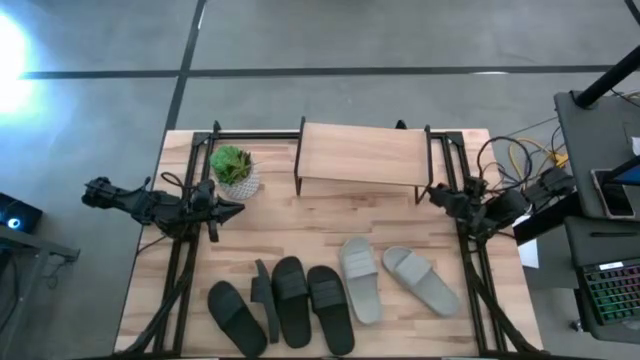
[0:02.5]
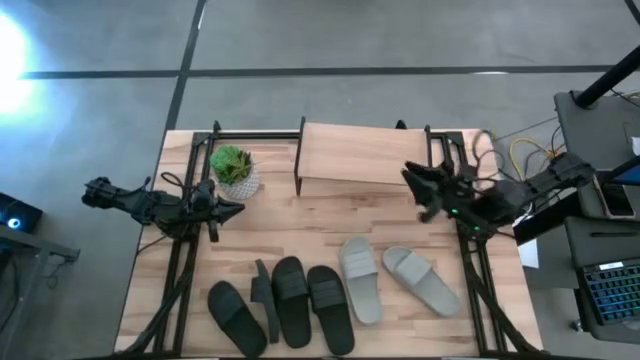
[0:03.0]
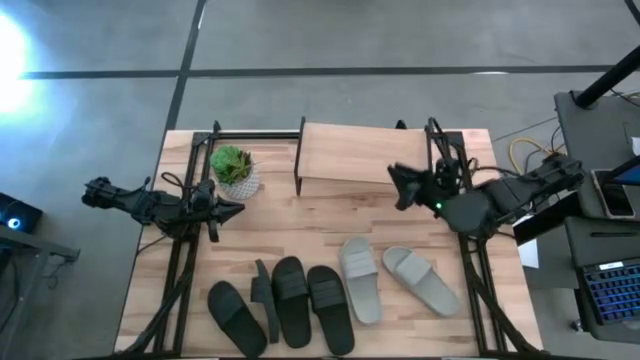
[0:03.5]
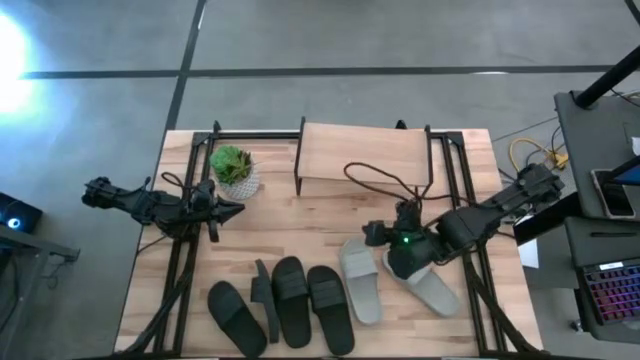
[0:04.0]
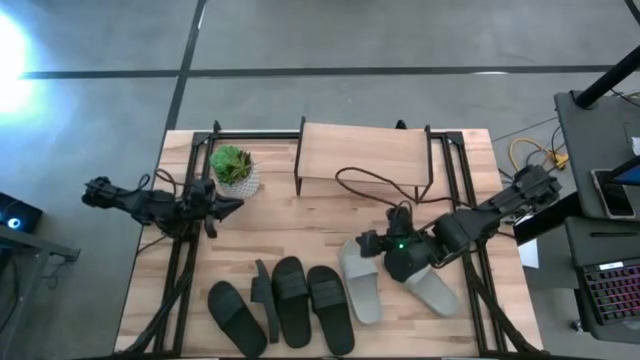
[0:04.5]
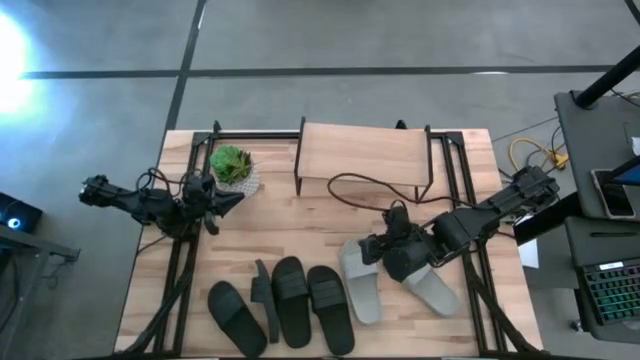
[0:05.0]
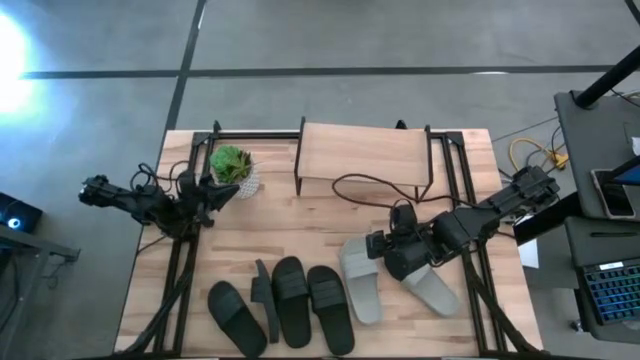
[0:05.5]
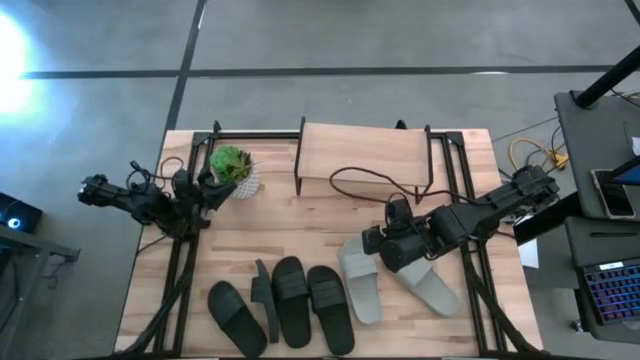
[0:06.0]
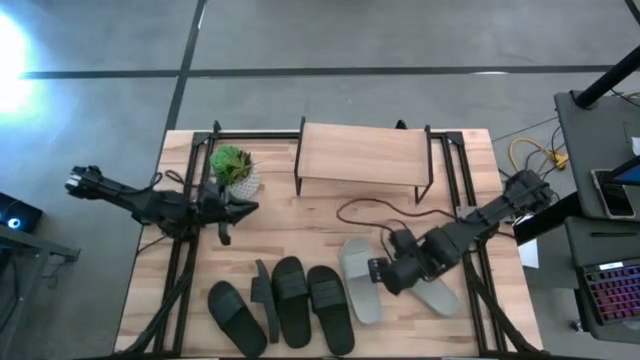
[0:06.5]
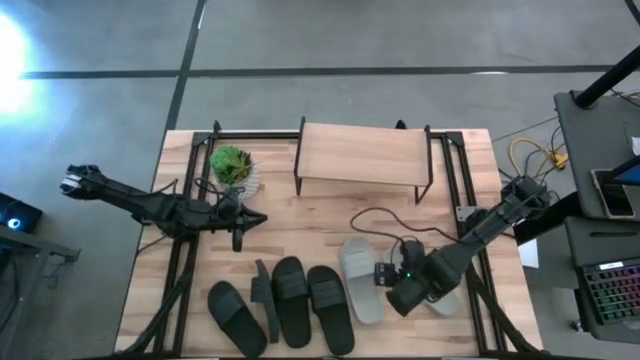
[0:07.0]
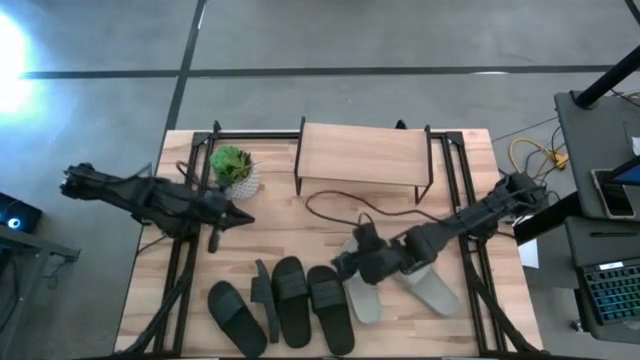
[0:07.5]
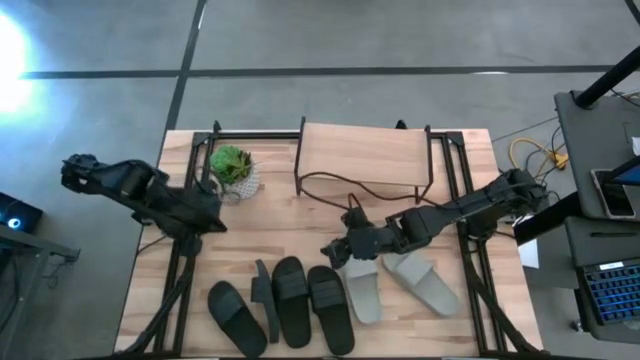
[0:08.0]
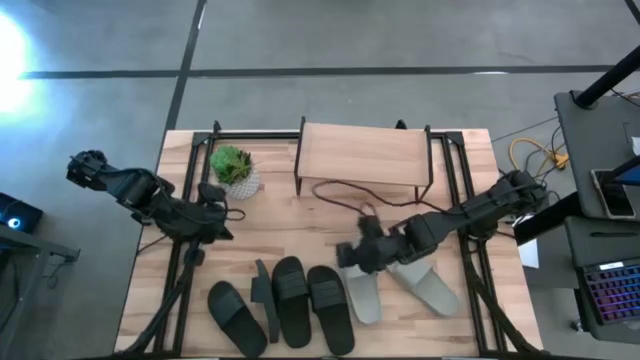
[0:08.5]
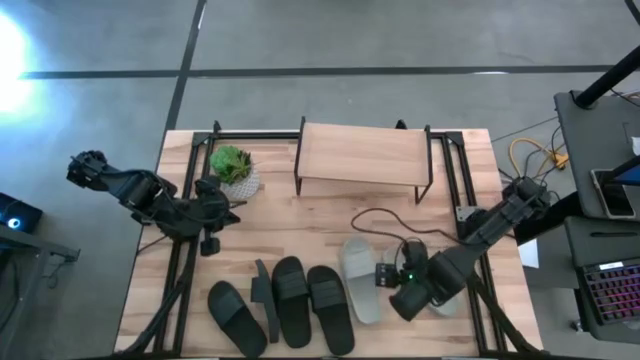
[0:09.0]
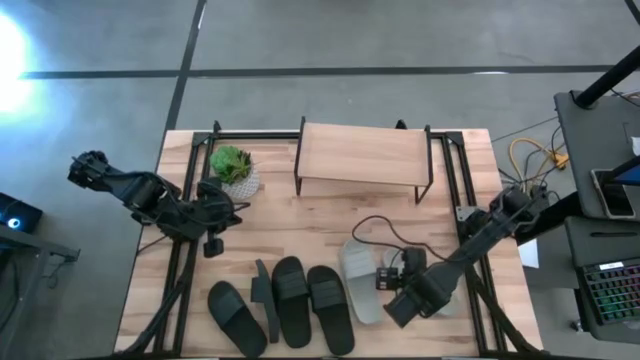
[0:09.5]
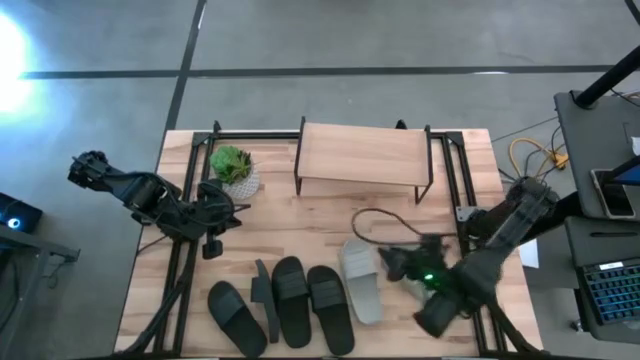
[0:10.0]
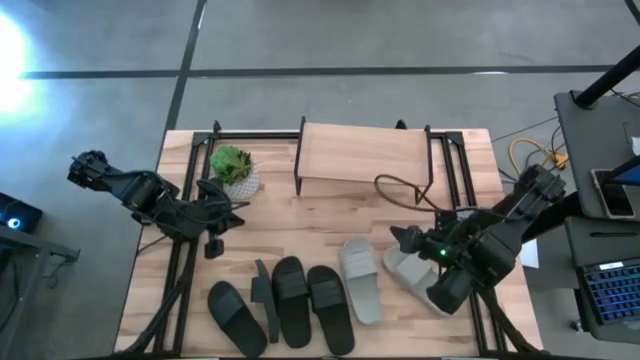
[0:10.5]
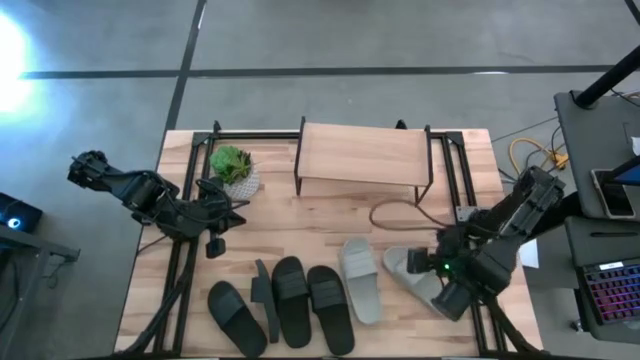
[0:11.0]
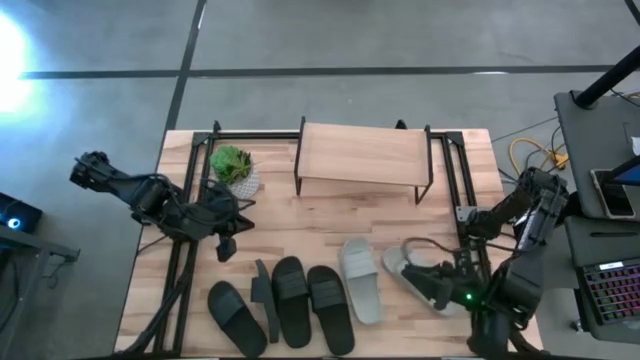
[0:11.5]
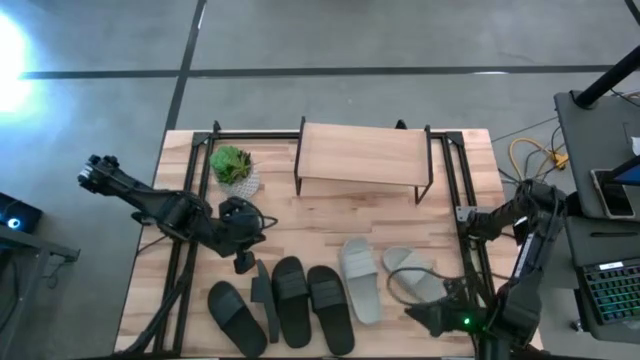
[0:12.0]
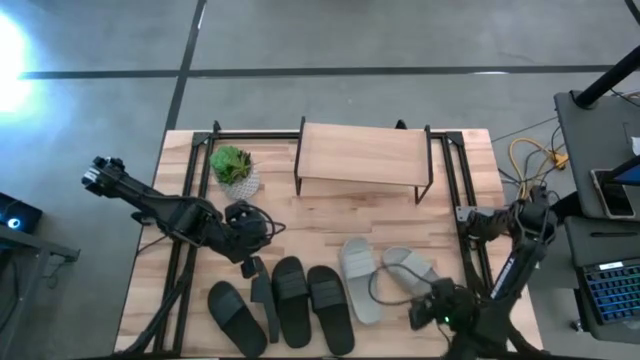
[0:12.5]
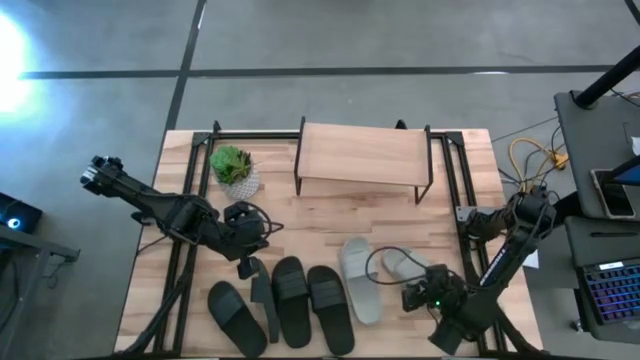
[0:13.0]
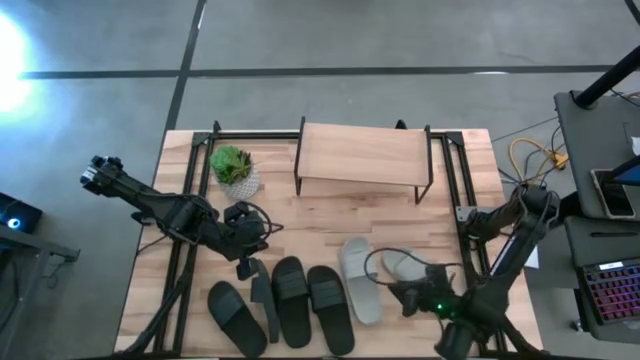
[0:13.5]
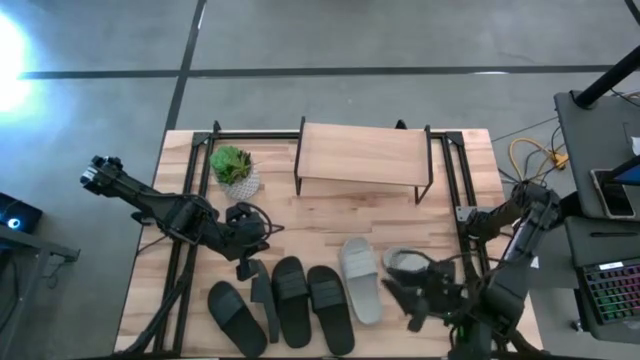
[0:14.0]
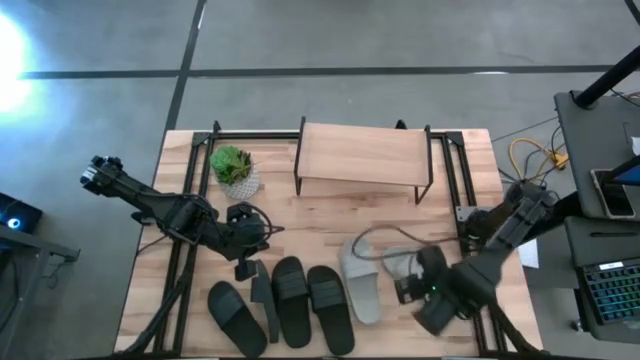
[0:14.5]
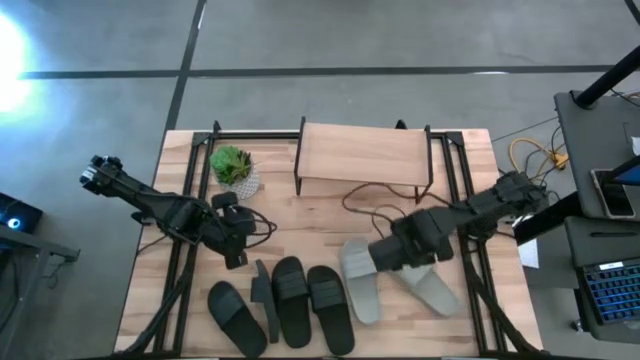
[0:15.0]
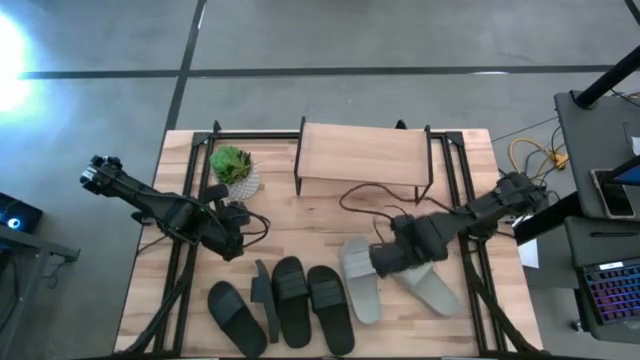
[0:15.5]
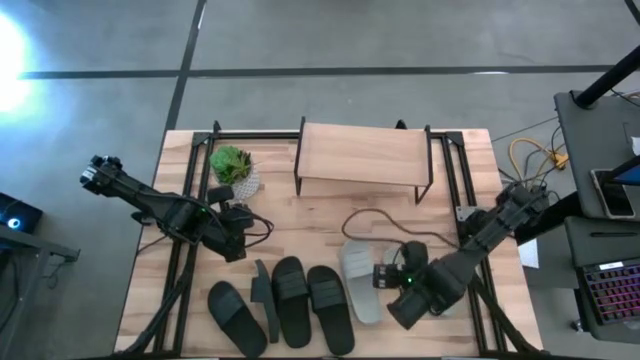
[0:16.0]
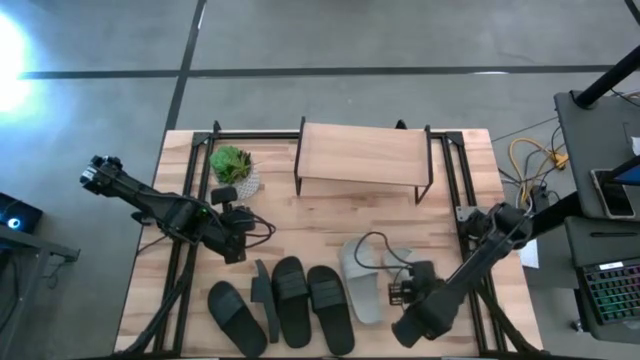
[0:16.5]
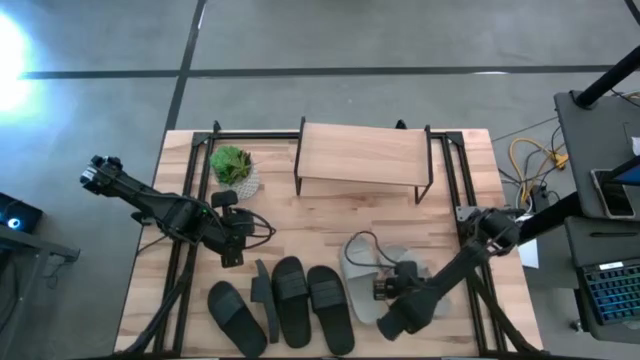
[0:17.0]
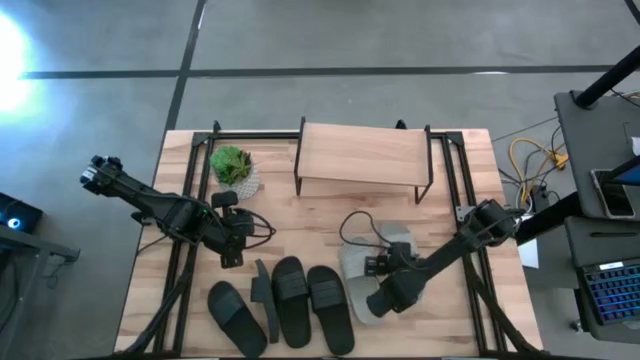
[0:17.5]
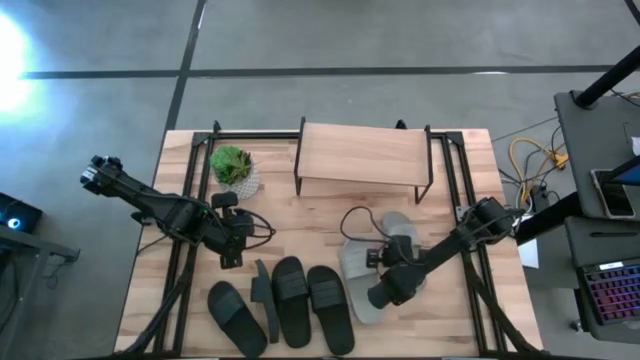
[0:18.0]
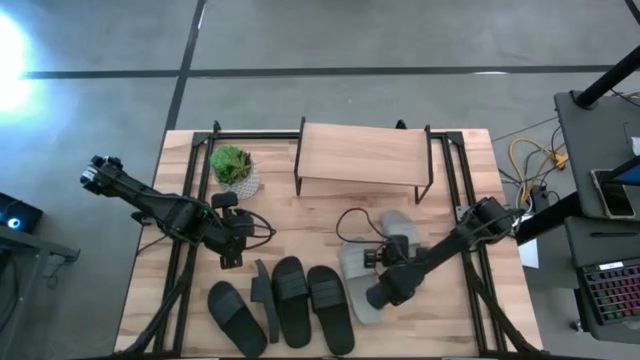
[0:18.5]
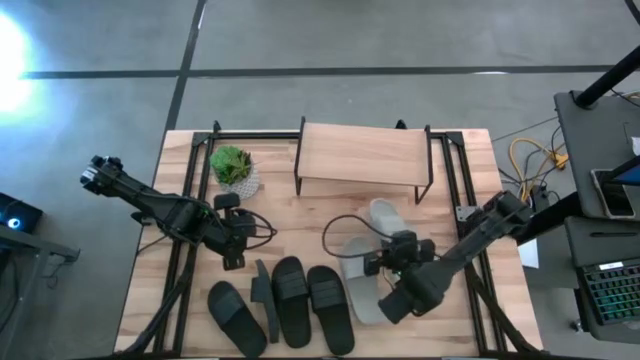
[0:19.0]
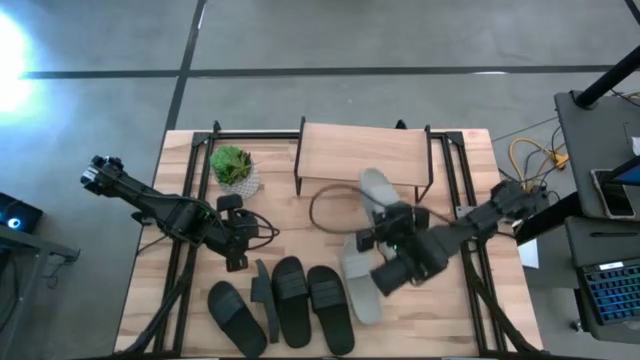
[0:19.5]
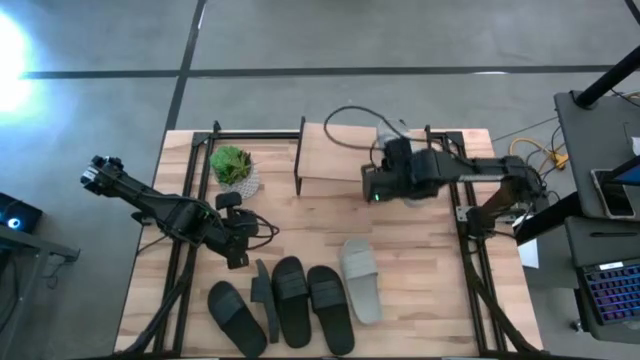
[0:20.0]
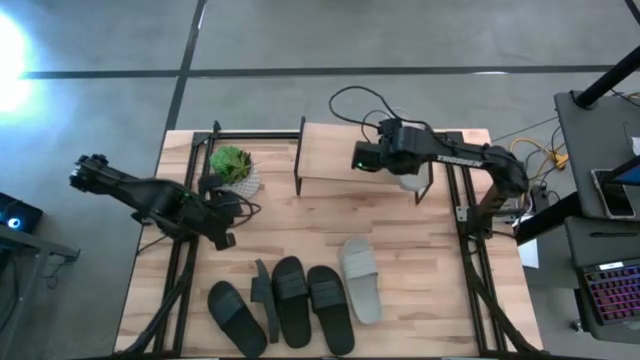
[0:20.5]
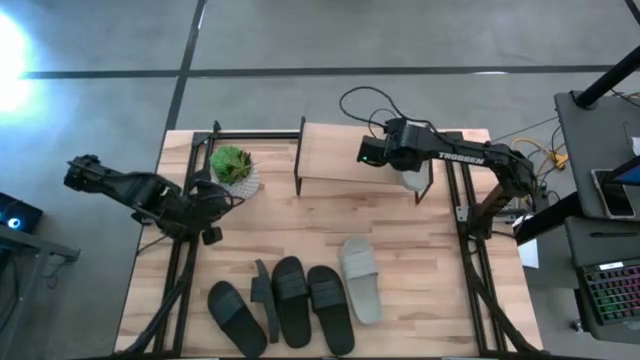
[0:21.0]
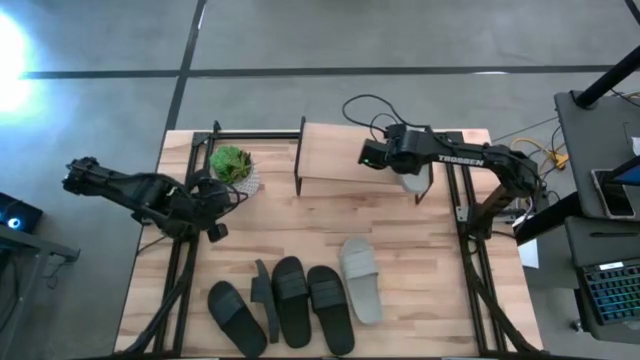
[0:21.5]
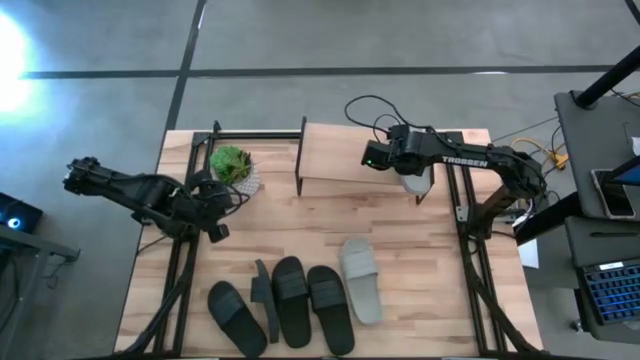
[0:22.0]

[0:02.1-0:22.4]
Task: Pick and place slides into the shelf
Put the gray slipper on the shelf
